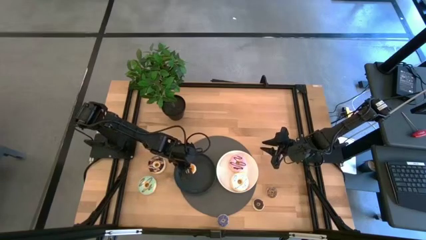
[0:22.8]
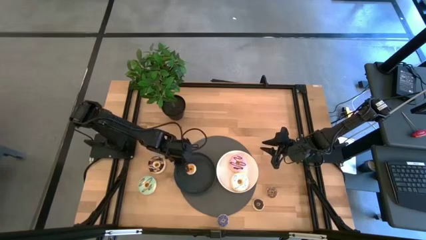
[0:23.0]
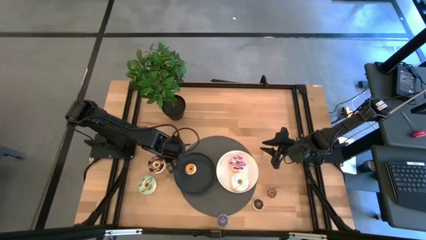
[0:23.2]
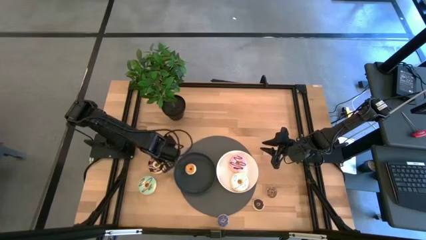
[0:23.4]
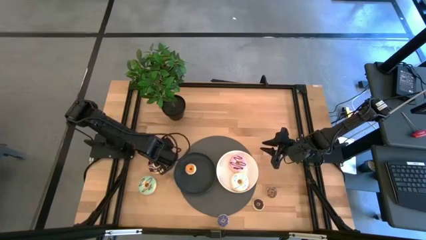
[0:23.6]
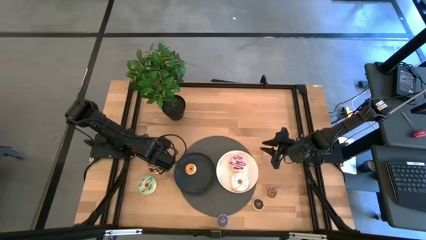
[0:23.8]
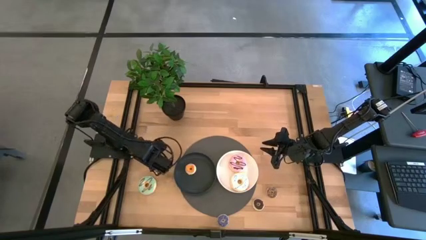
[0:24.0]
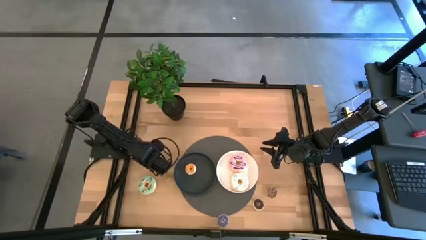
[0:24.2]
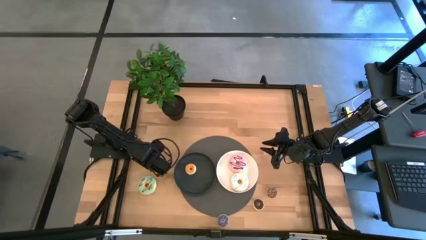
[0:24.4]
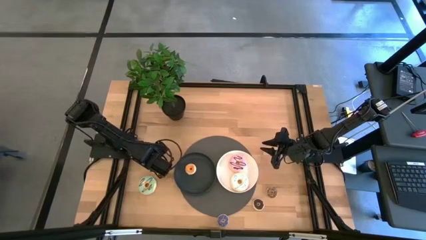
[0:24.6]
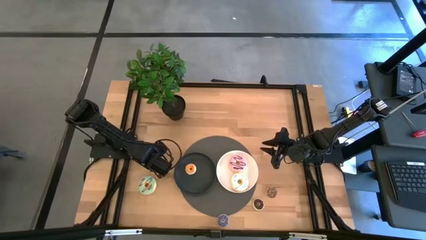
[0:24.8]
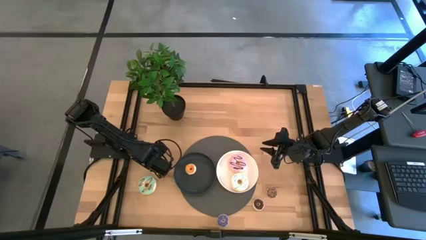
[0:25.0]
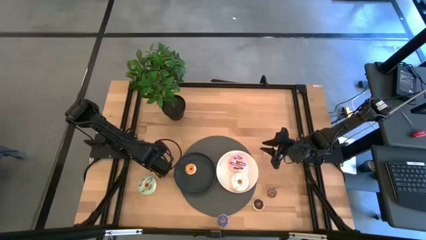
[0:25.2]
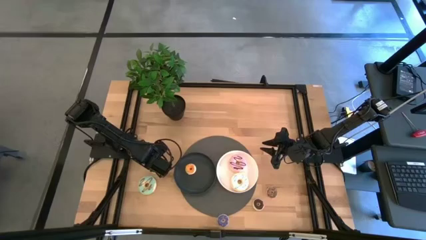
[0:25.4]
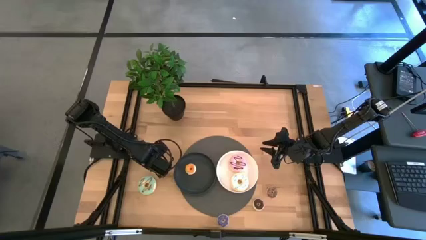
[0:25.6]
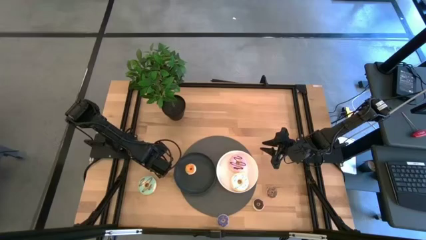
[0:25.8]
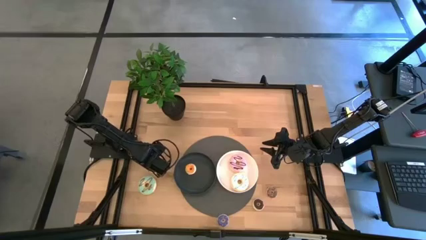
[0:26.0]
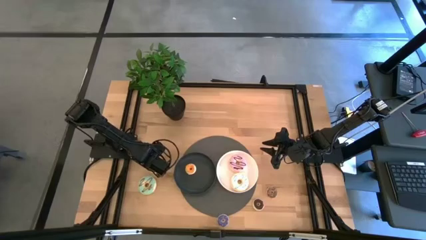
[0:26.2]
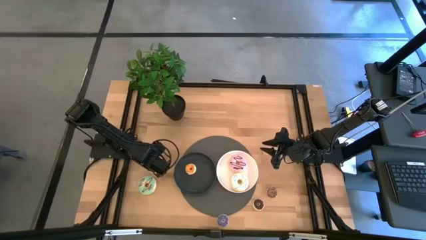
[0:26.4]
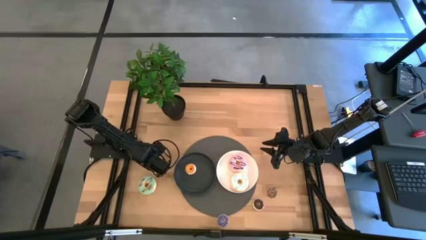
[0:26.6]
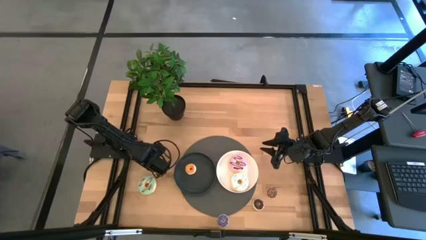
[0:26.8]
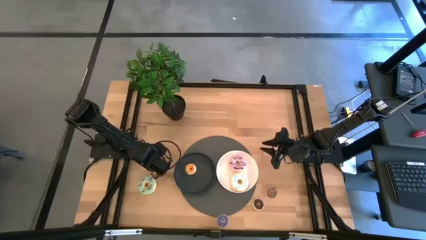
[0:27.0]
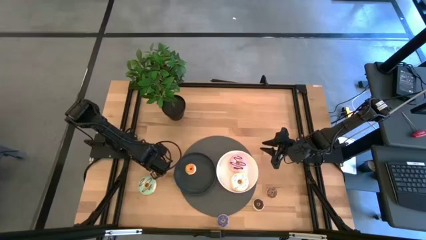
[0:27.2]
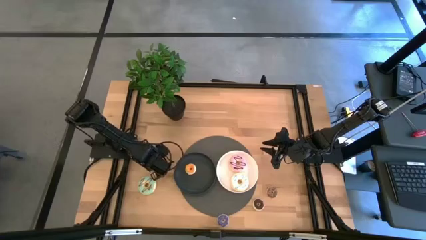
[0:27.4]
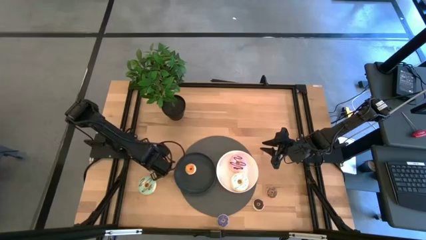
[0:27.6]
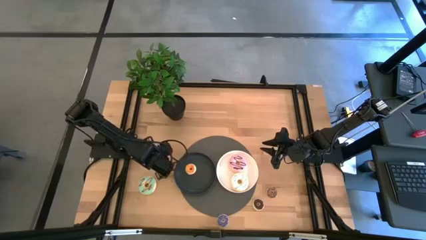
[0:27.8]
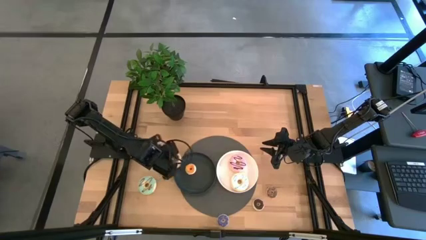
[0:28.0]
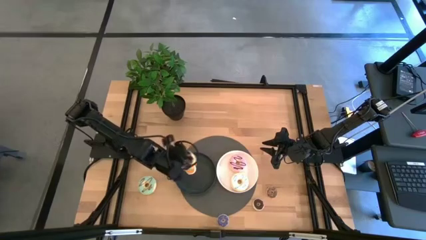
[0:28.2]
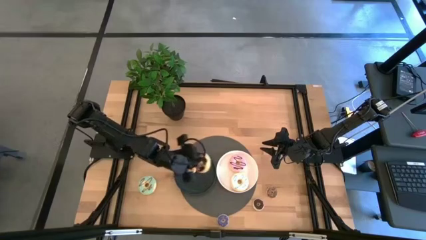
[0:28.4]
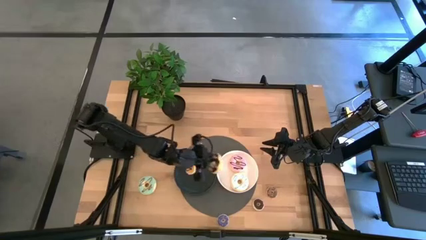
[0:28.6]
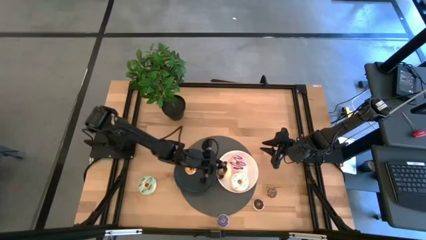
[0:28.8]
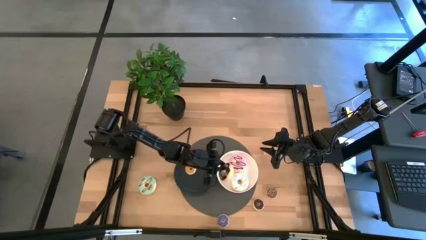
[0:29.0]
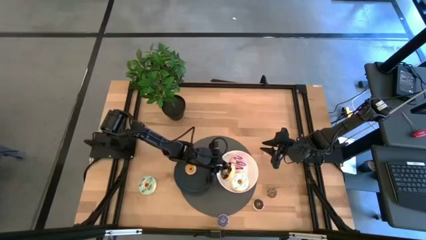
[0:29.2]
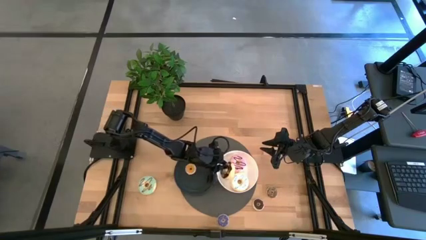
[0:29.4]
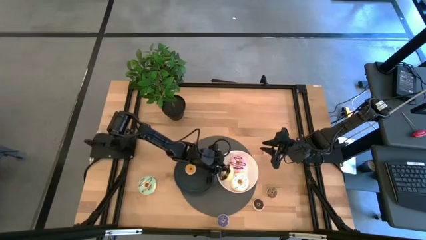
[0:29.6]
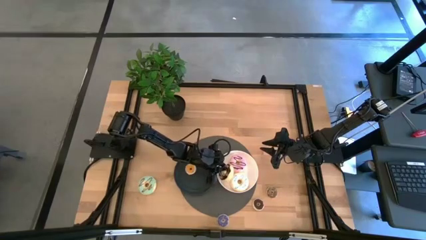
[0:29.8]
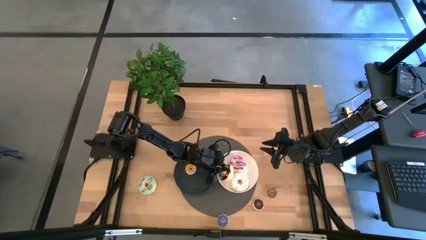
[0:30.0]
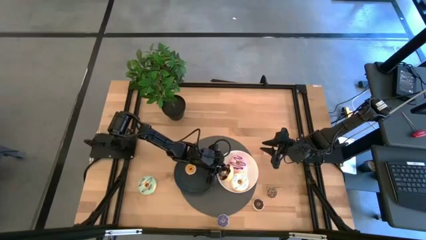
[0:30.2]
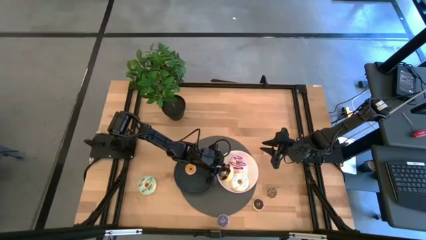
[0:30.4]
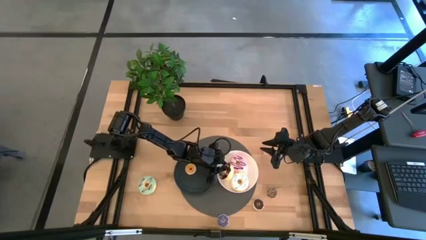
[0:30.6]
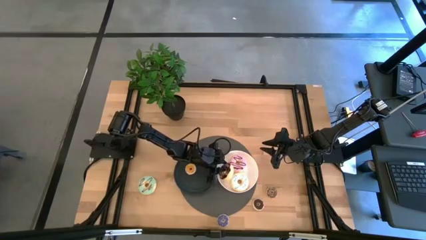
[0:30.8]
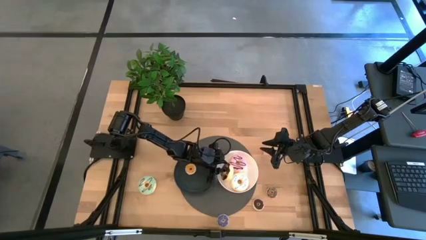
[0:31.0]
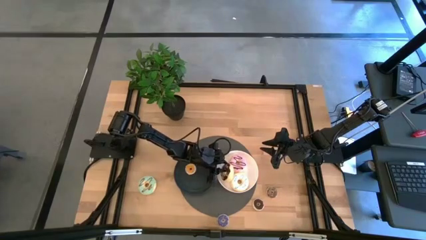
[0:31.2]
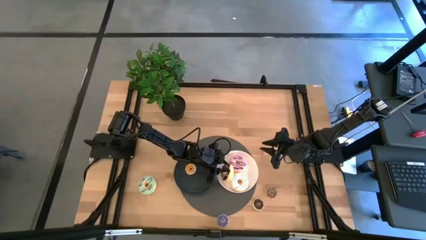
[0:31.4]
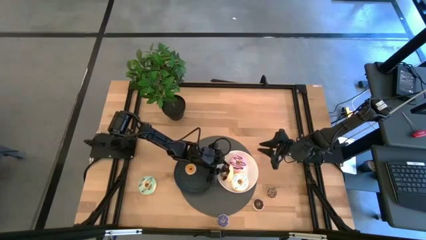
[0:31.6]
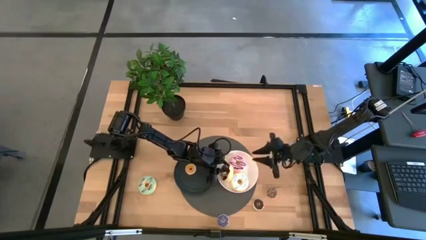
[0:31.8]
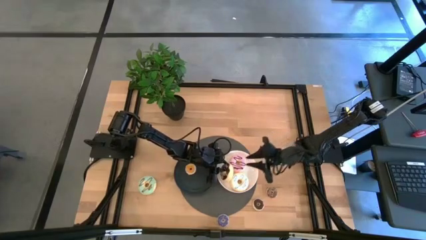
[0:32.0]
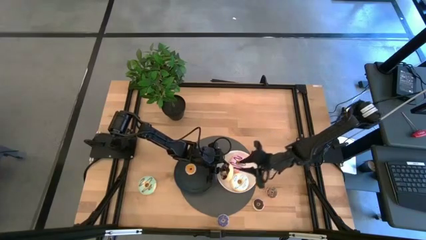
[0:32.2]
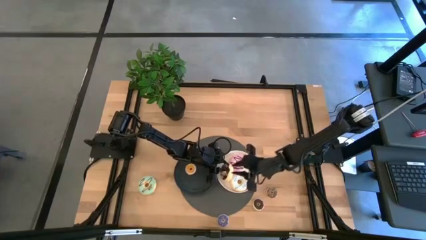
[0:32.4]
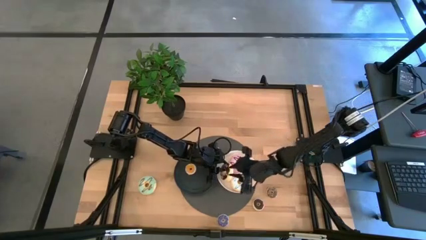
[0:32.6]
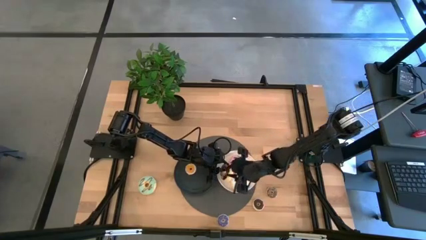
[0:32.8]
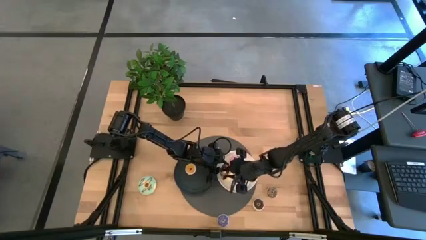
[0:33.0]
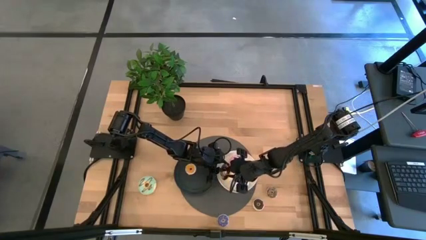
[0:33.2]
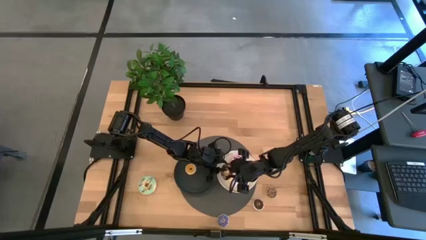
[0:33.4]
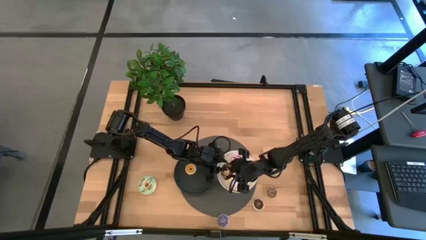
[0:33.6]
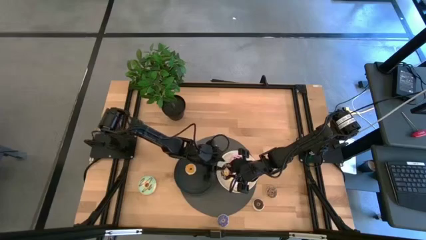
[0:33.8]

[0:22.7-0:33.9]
Task: Pick & Place donuts
Put the large black donut onto the white plate

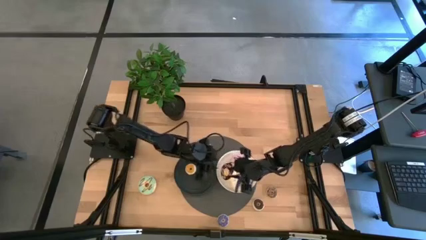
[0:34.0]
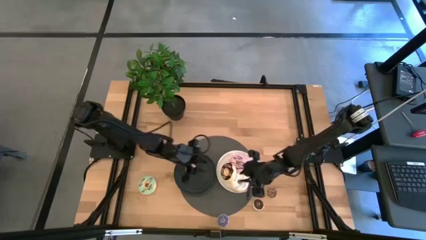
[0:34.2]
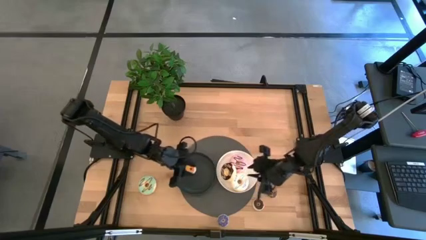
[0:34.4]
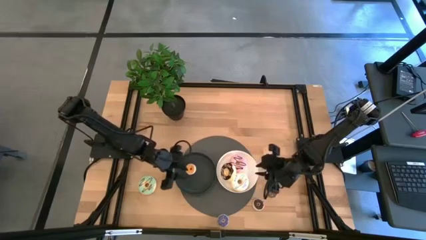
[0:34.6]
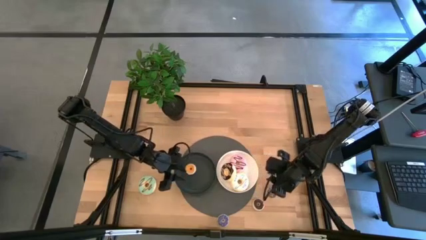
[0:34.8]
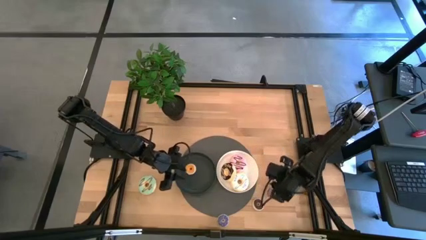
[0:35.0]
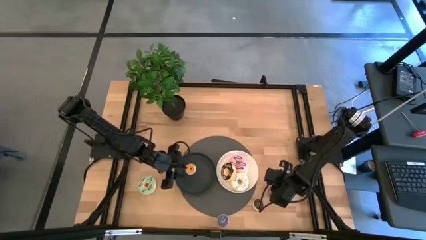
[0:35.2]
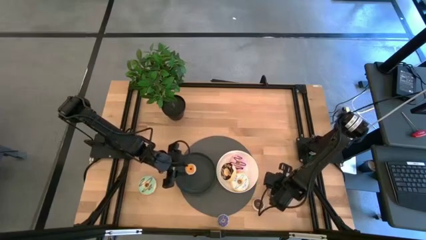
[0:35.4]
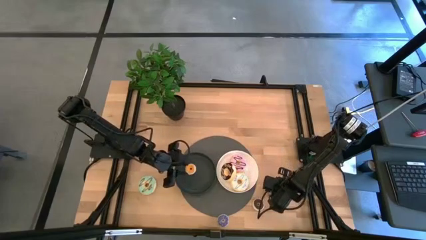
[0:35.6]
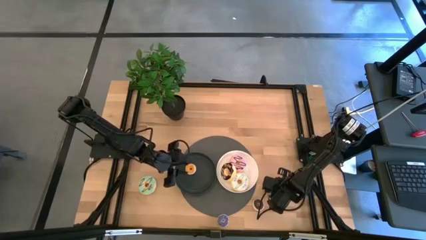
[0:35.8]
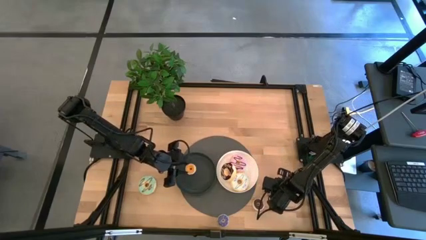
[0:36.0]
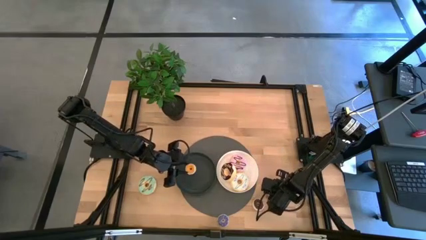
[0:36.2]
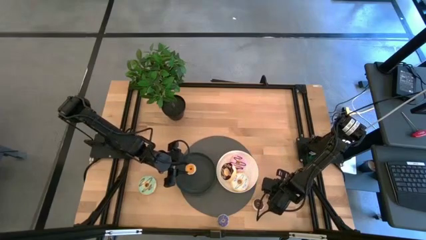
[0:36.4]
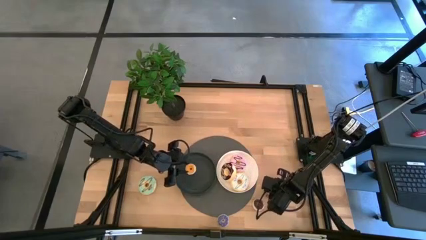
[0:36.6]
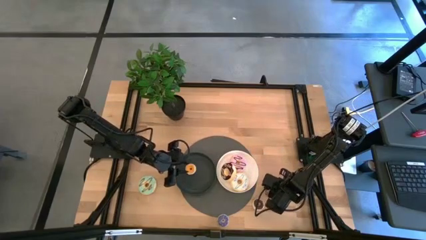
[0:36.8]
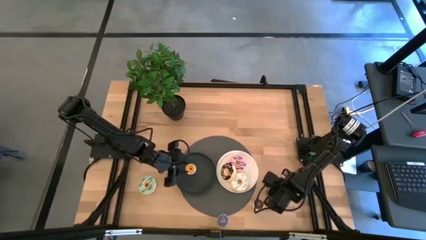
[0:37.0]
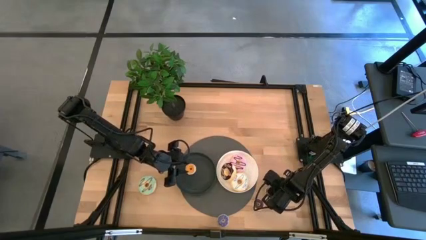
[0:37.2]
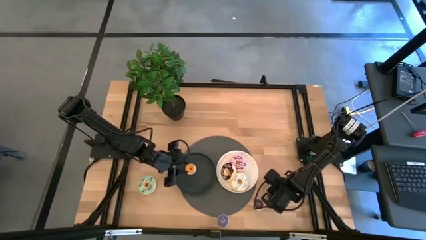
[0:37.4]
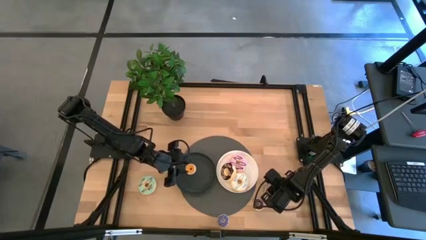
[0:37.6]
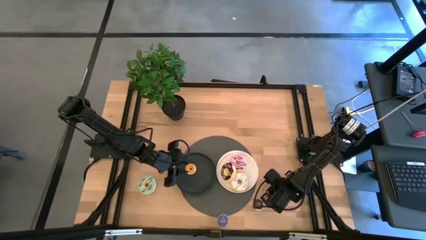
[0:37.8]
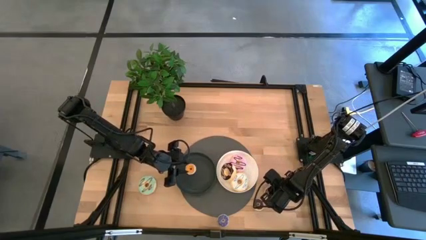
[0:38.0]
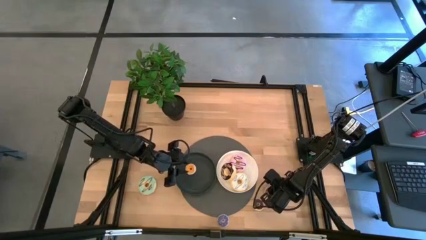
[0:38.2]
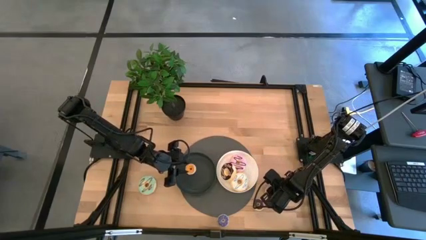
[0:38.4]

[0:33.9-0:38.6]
Put the small brown donut onto the black plate
